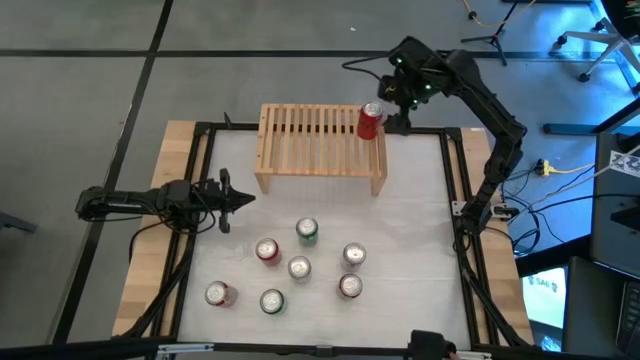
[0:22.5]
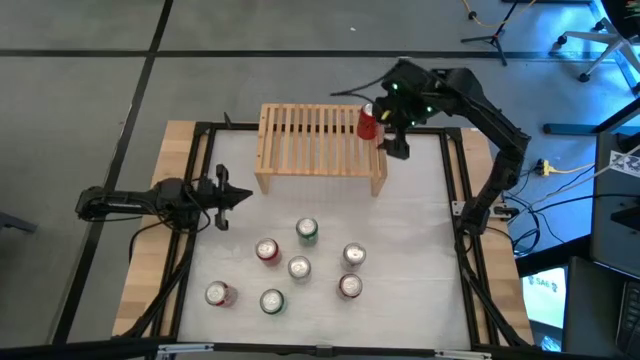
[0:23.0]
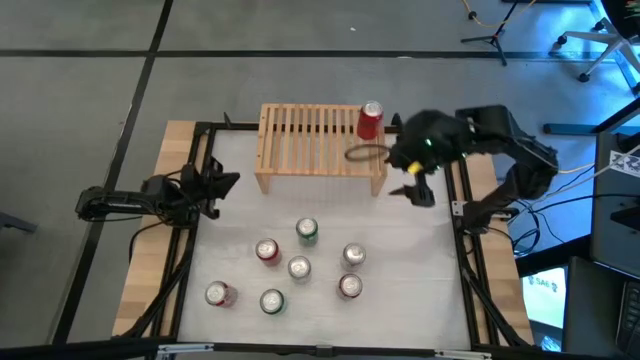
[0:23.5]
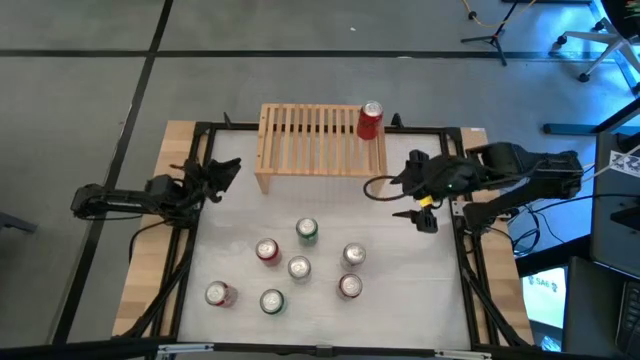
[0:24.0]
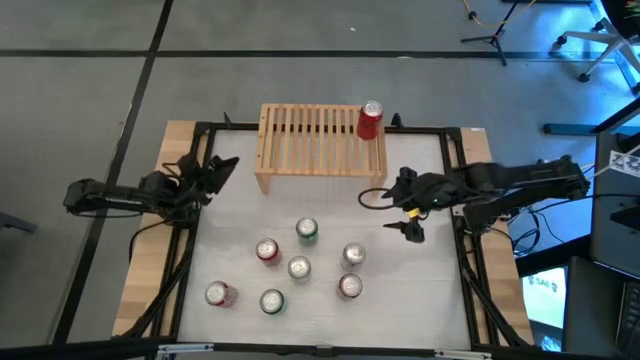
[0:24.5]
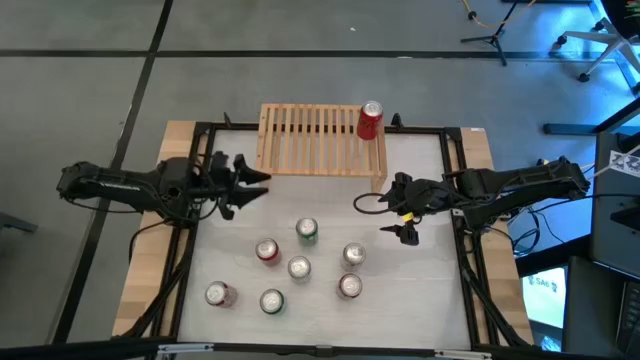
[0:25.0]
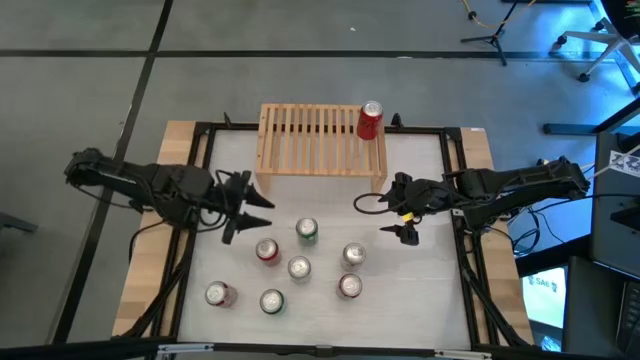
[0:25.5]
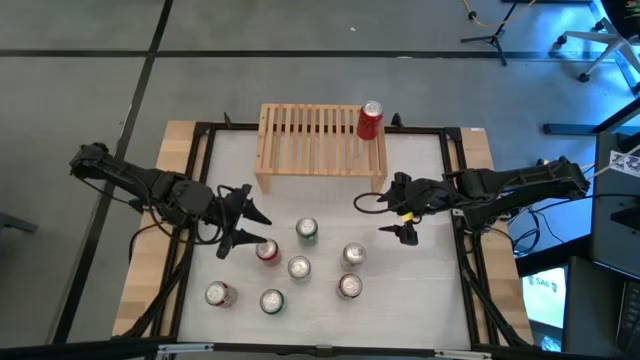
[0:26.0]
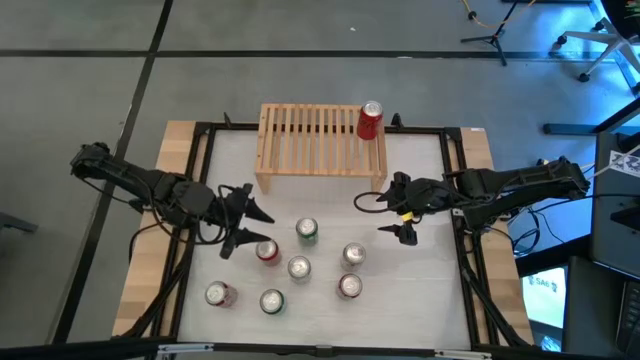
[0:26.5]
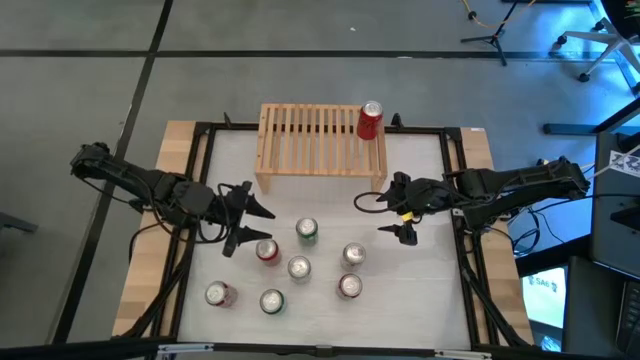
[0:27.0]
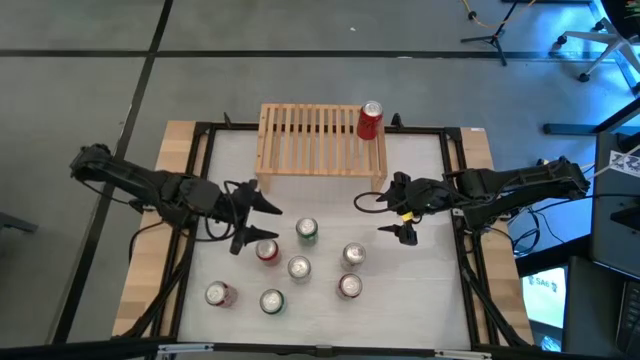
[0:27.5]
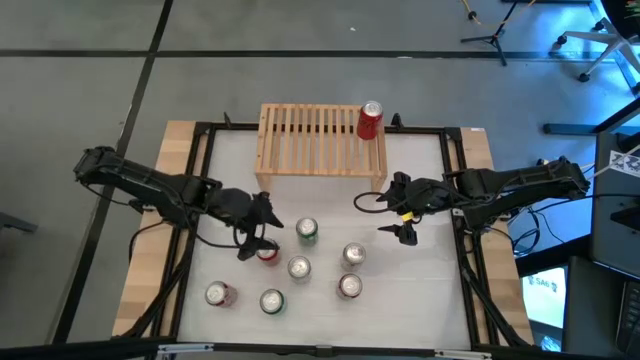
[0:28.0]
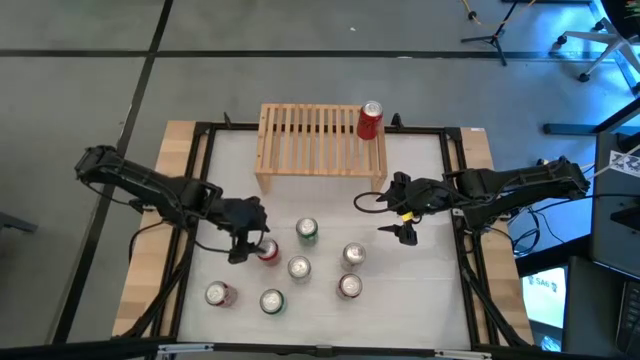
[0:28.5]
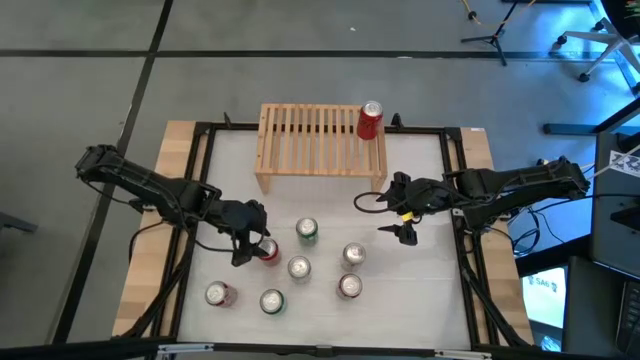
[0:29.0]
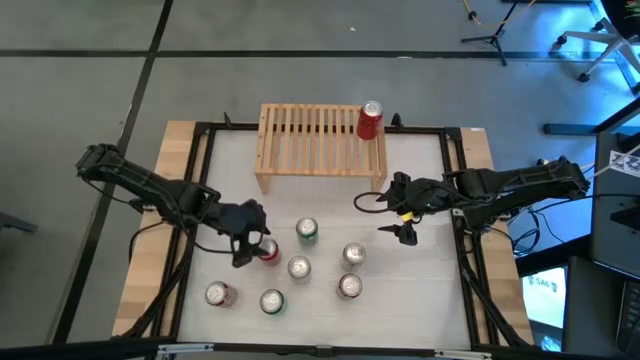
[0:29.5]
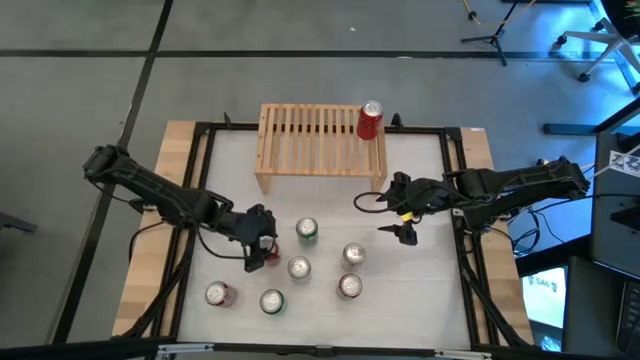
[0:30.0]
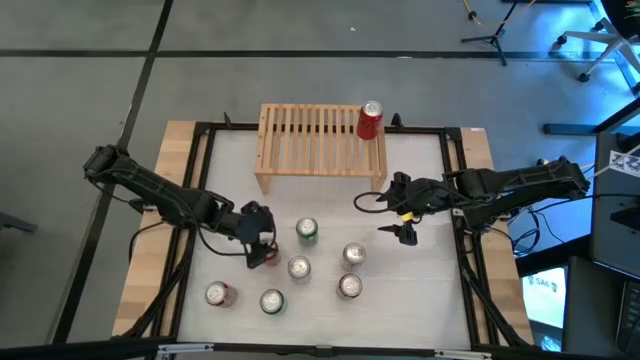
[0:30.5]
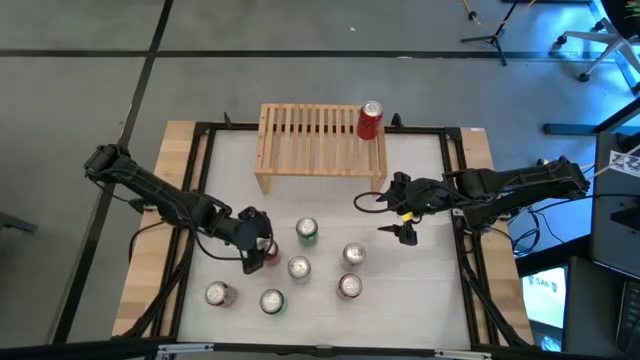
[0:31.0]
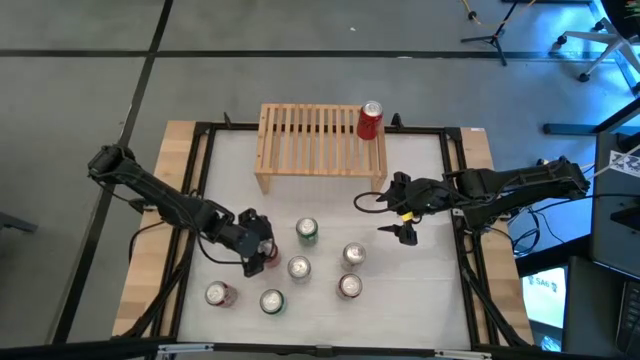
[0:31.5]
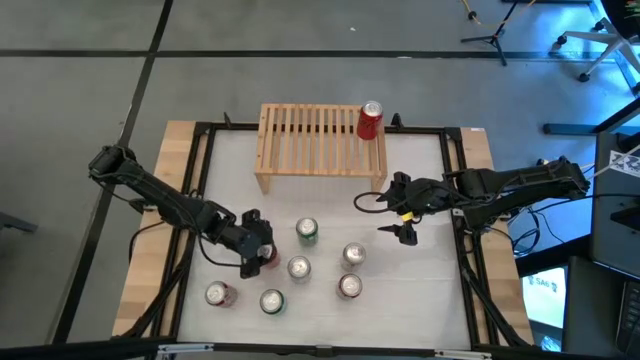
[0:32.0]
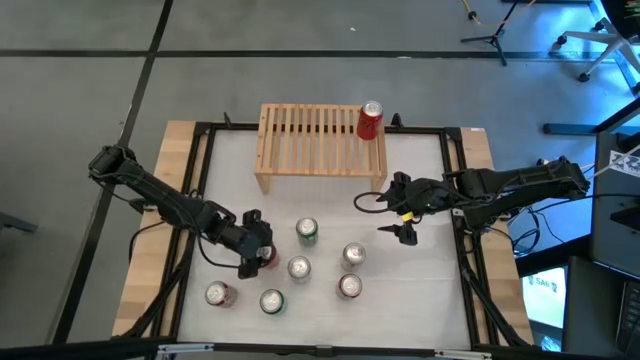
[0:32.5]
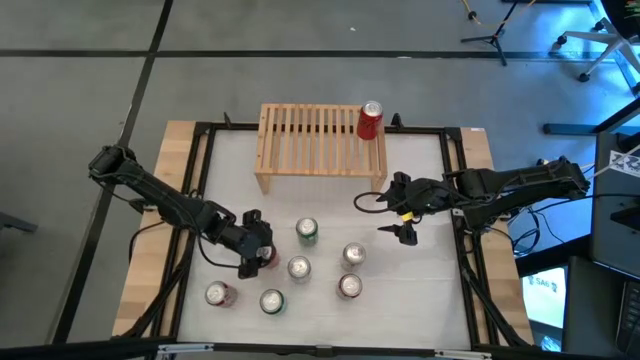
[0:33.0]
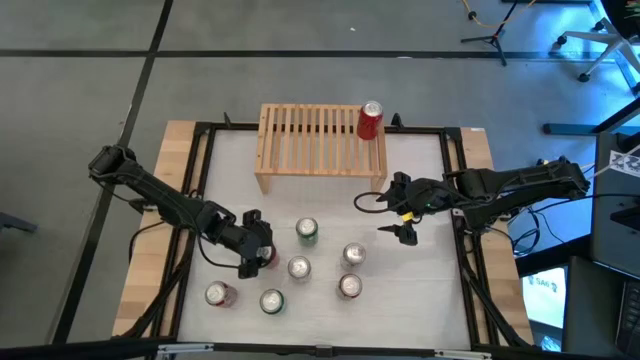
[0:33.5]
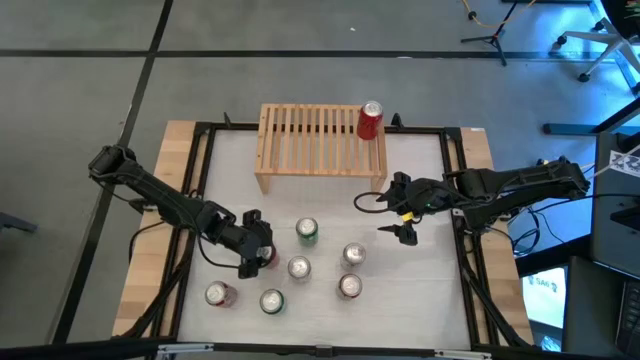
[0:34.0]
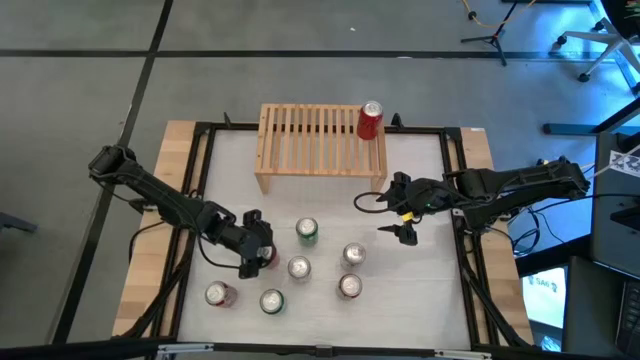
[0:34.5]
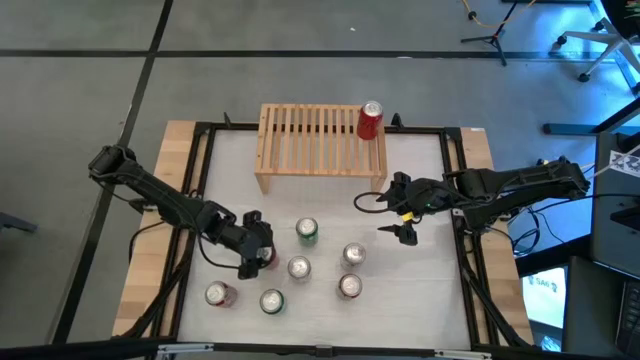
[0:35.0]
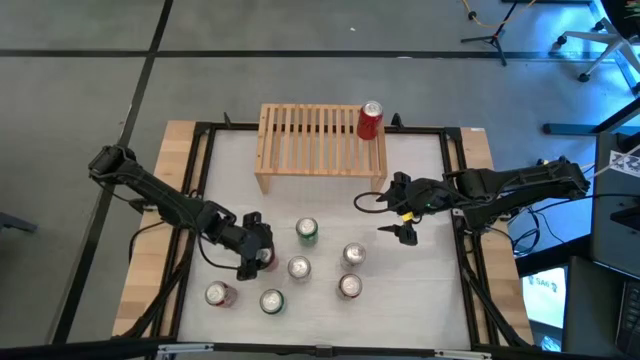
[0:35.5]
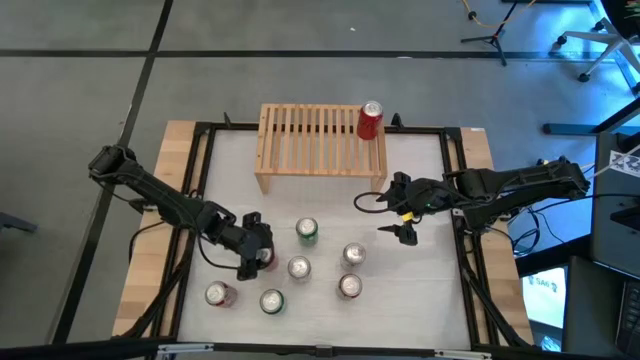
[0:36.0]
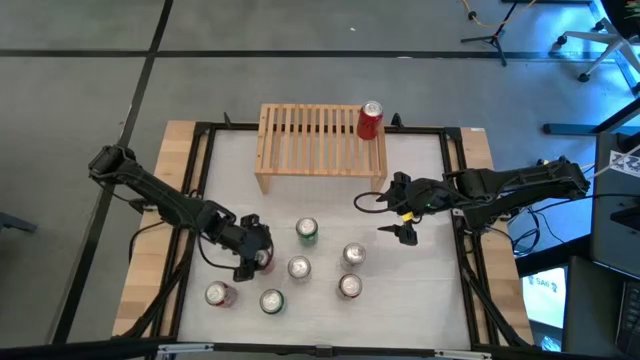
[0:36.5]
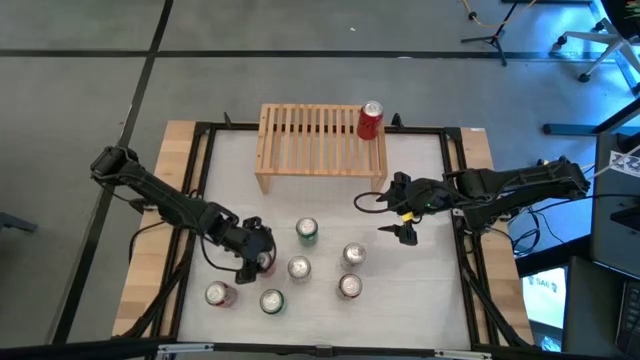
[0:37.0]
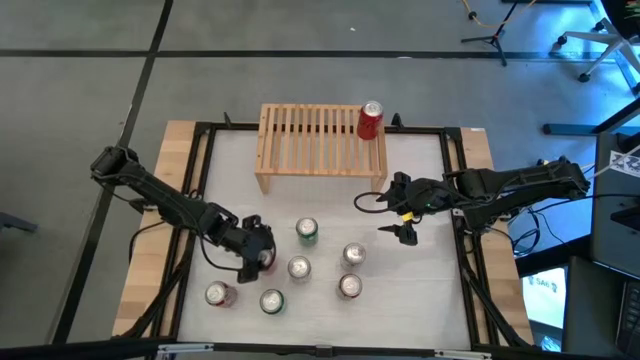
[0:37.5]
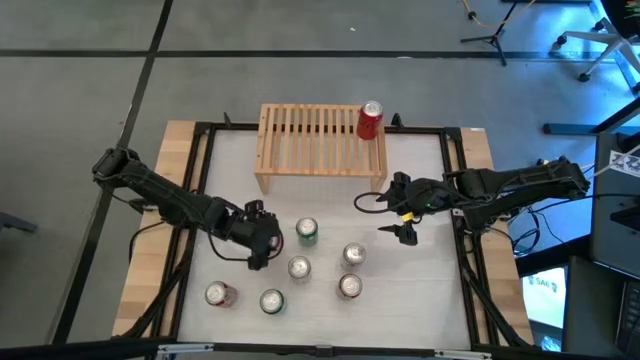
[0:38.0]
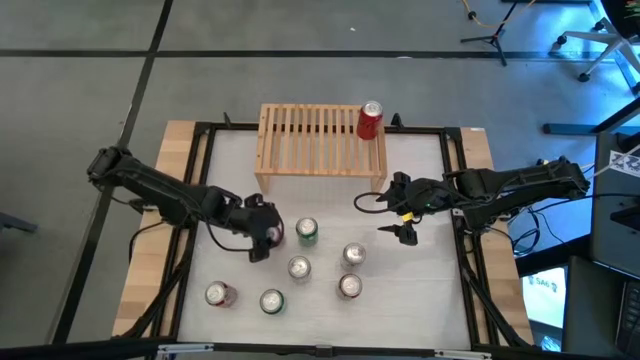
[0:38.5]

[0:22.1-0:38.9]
Task: Place canned beverage on shelf
Put the red black soda can on the shelf

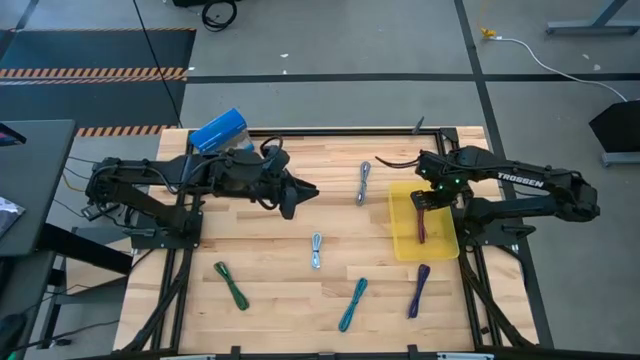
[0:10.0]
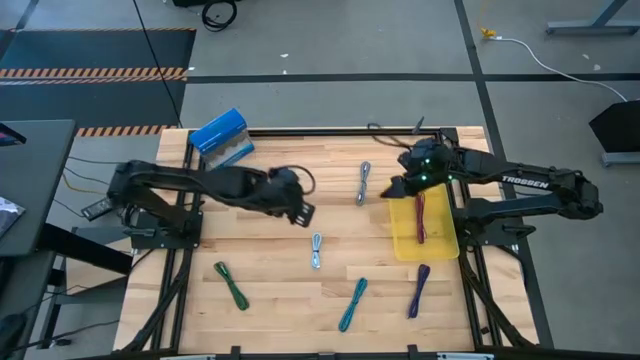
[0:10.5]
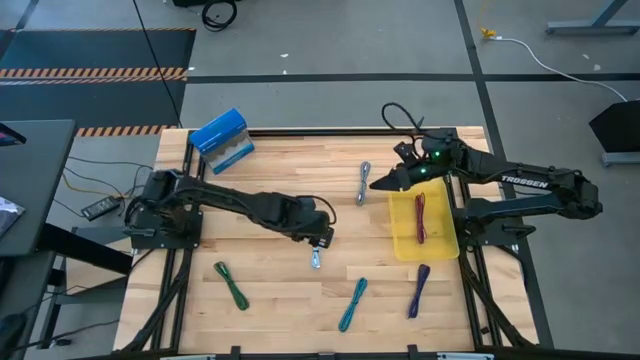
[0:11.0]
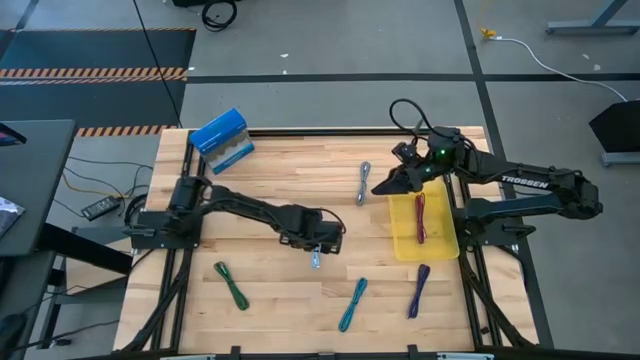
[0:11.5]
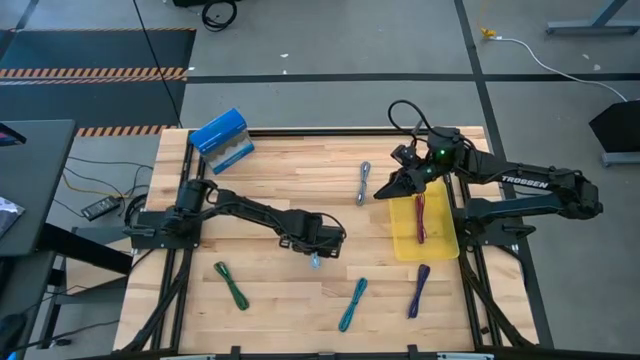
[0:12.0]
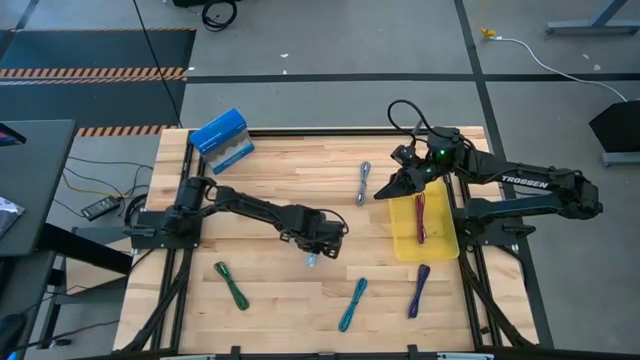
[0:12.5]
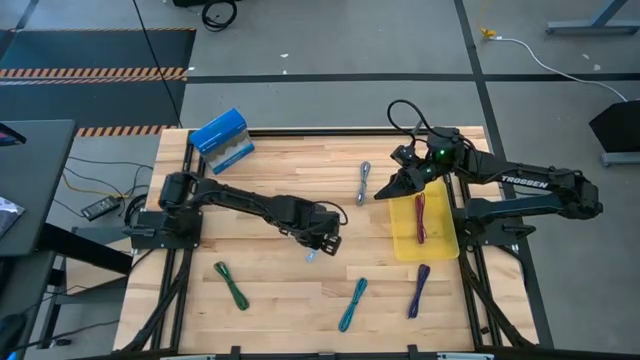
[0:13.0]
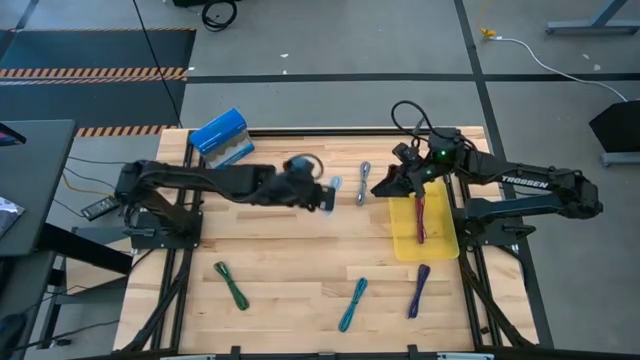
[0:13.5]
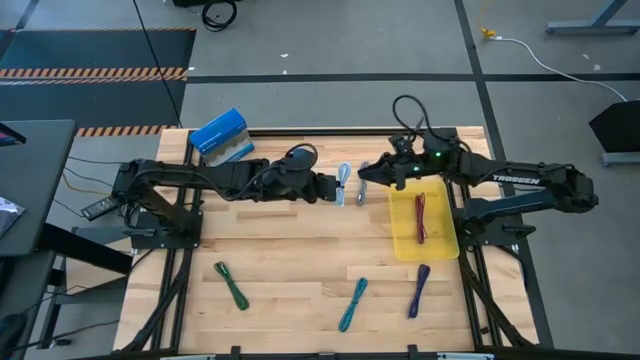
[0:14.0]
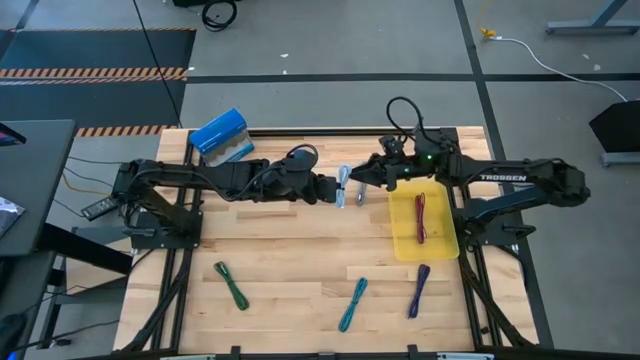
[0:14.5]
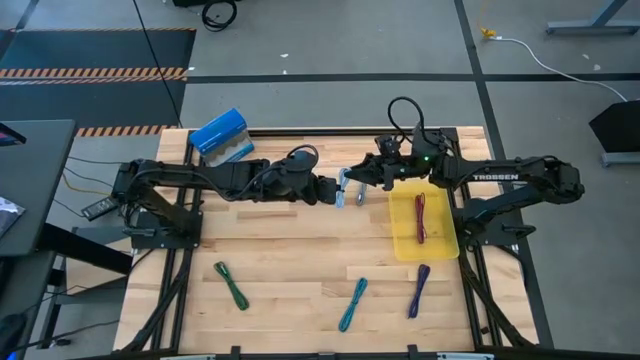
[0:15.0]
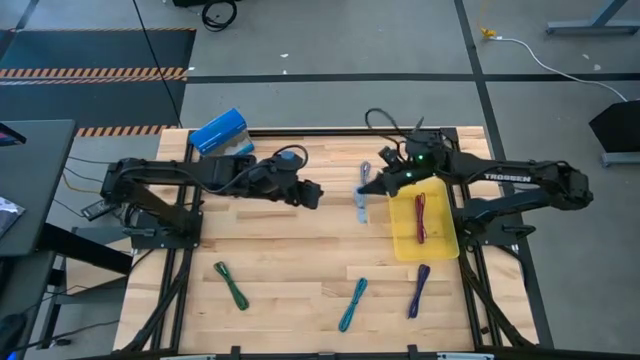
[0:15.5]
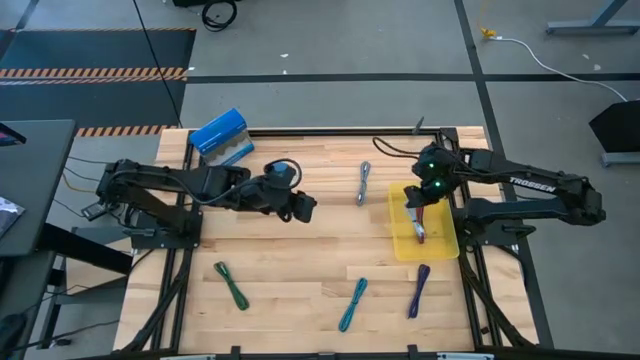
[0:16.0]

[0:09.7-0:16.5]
Task: Pick and place USB-C Cables
Put the white USB cable into the yellow container
